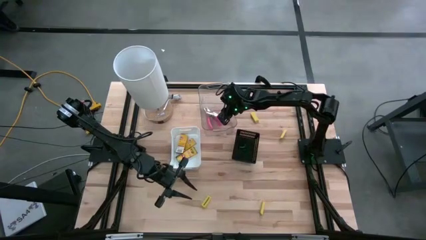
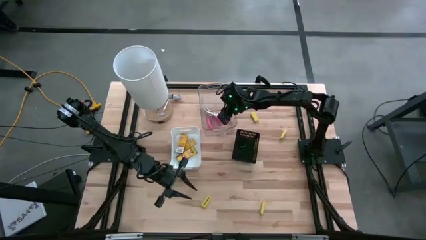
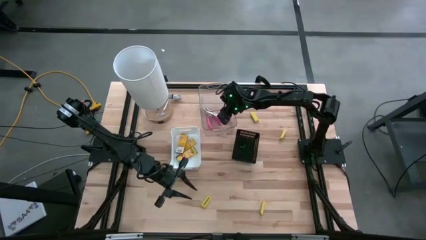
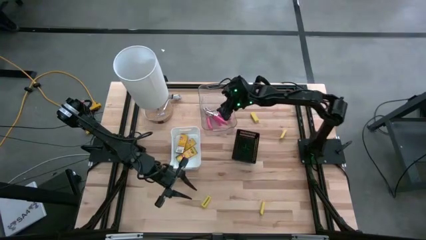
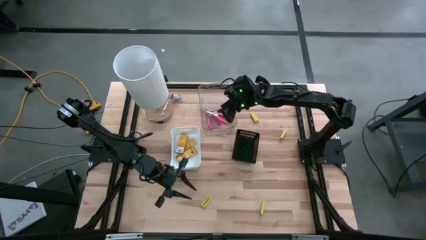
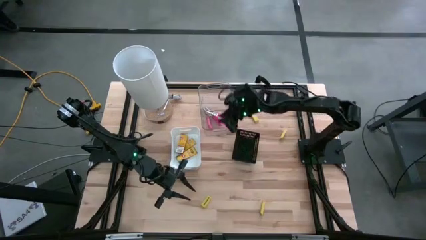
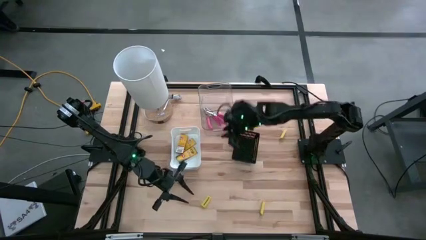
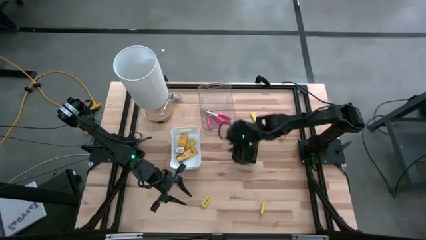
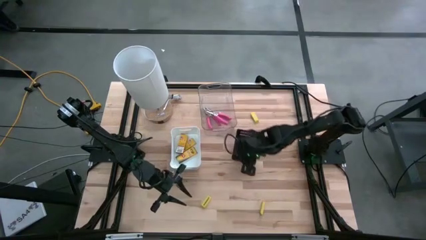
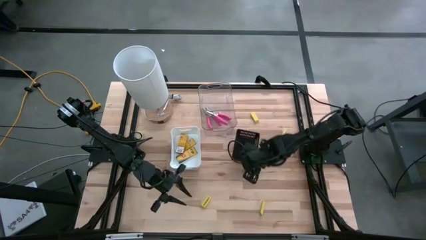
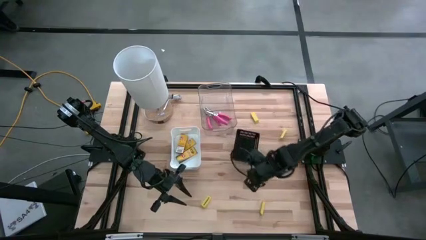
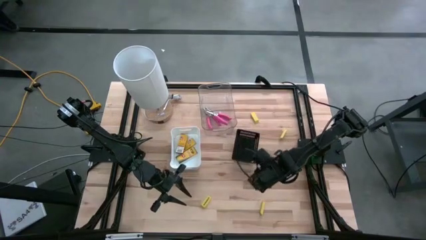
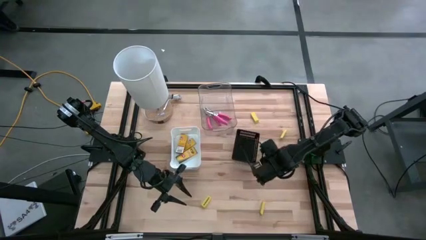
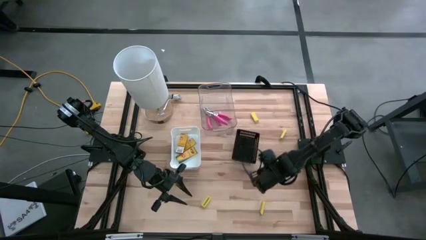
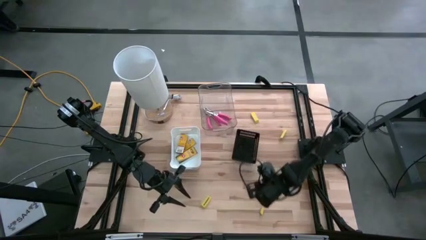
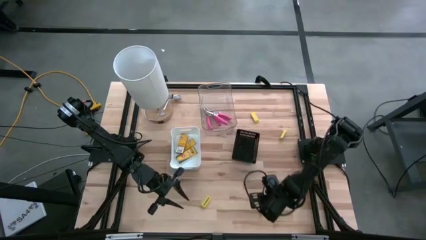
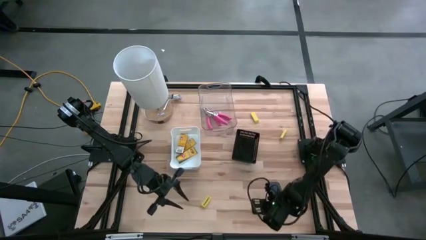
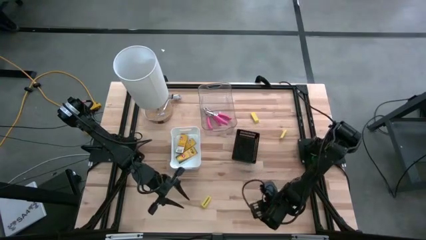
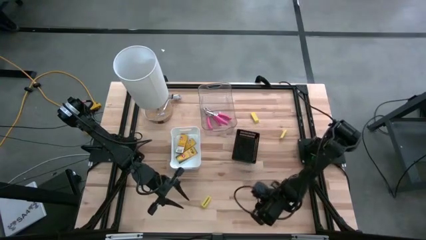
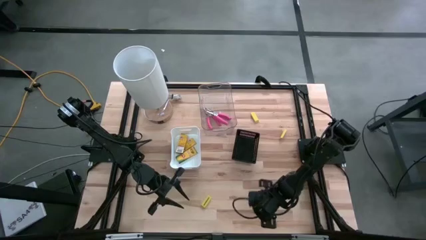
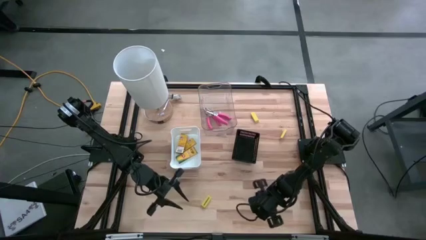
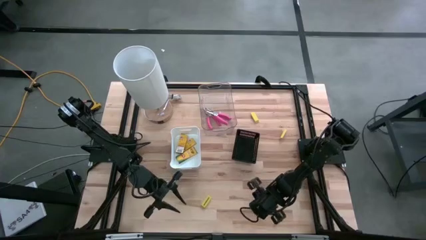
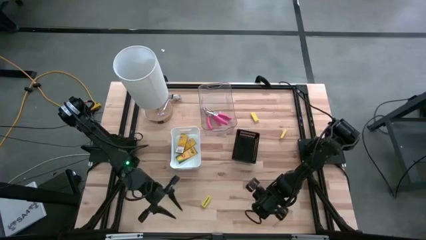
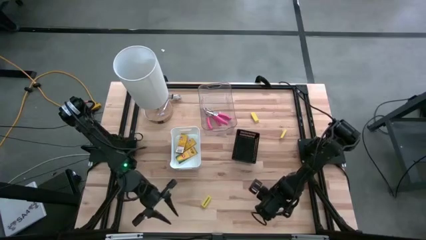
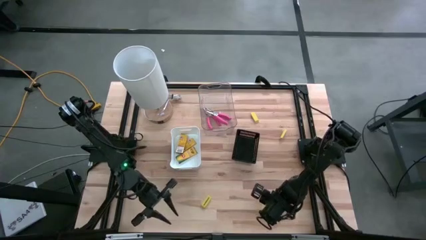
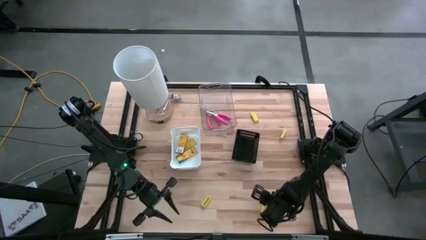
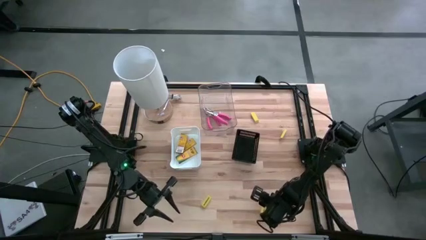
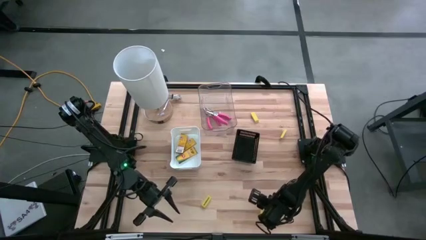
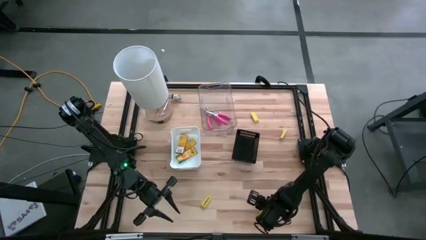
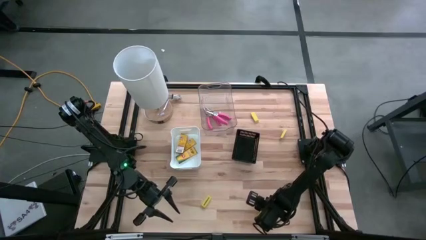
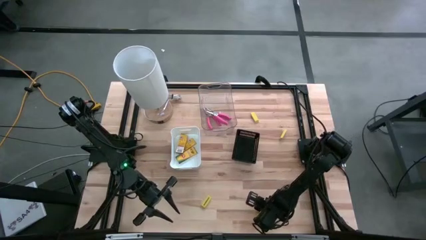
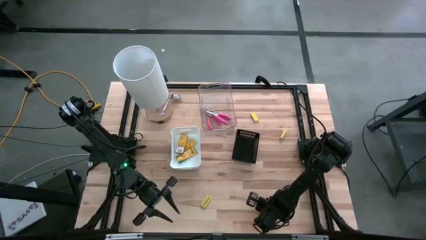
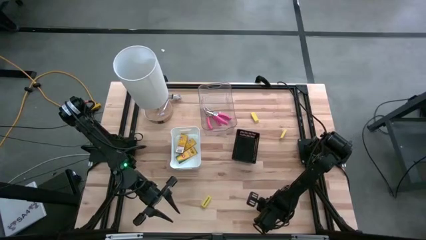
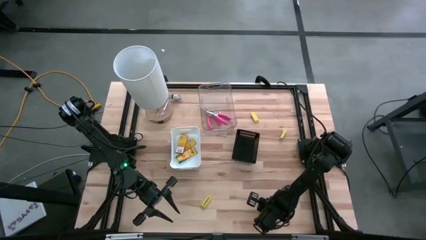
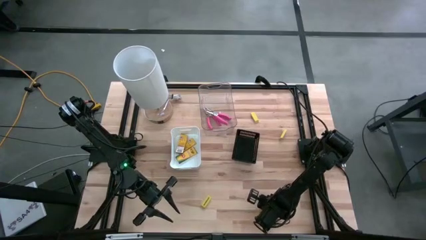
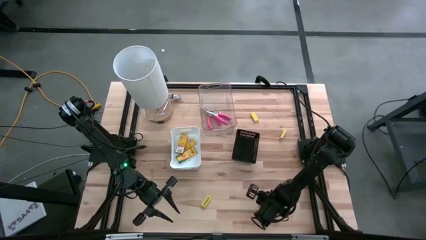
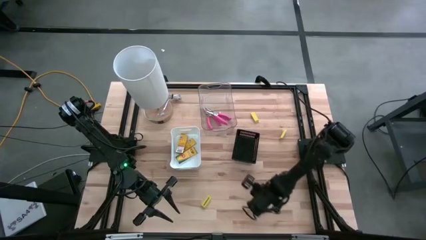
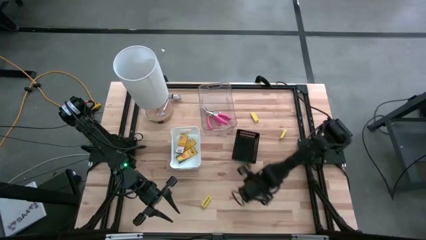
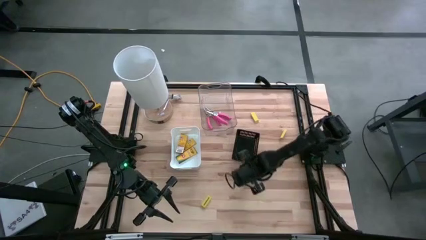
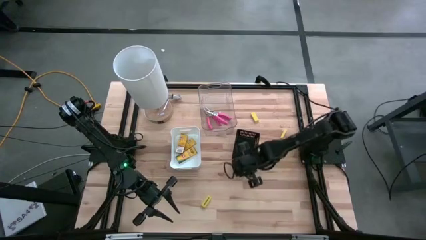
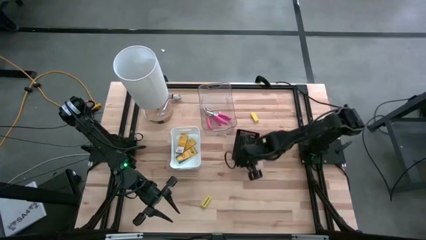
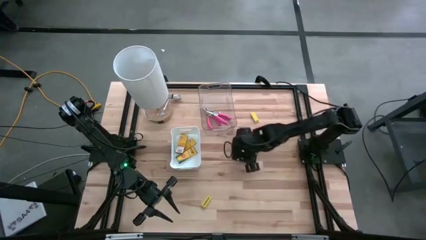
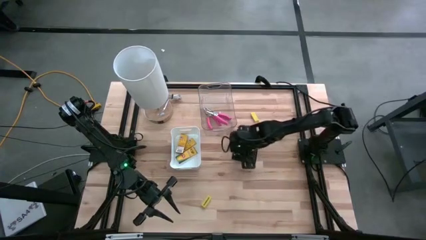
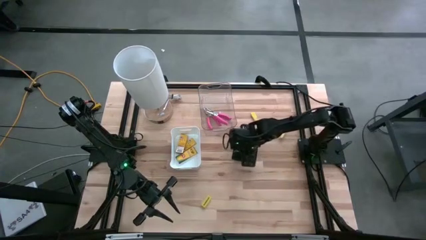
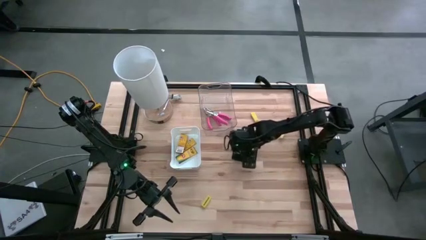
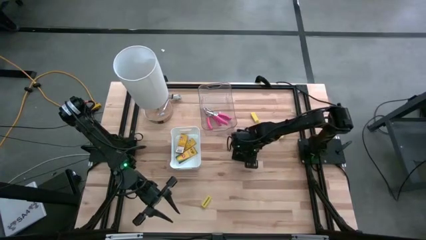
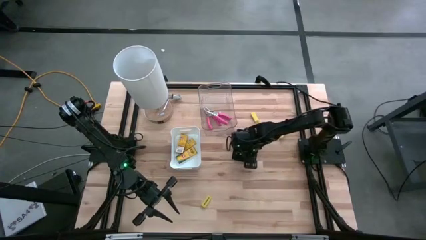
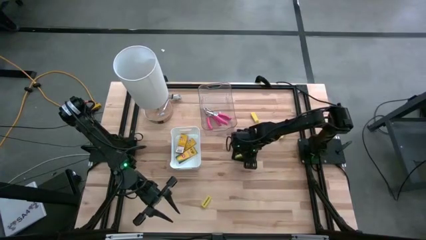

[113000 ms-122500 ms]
Task: Pick & Place School Supplies
Put the bottom right yellow eraser into the black bin

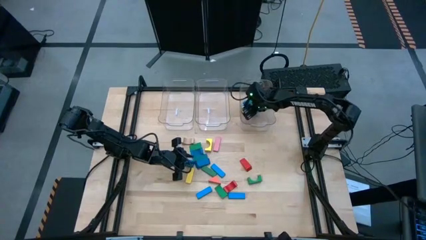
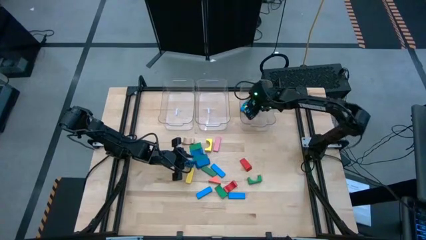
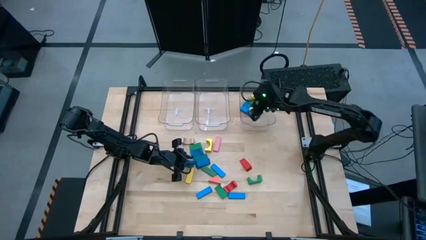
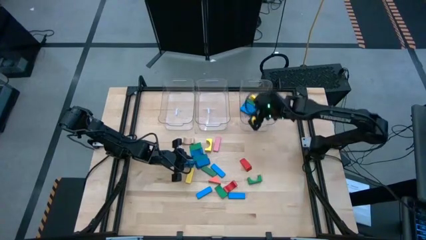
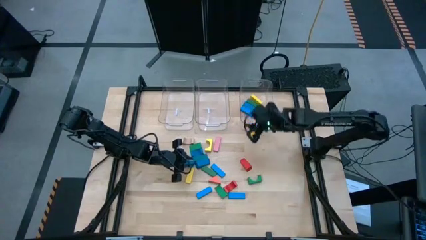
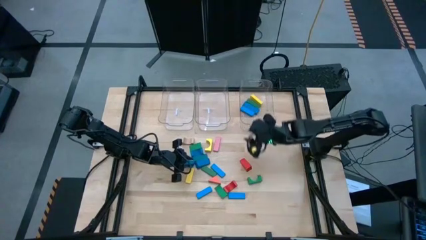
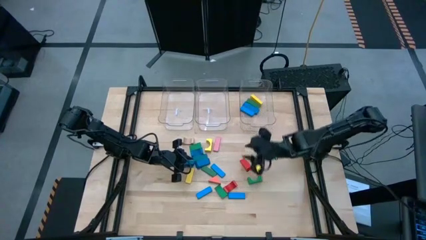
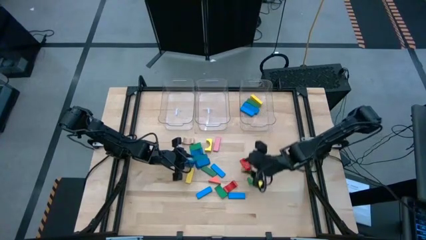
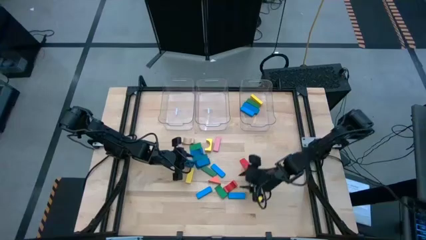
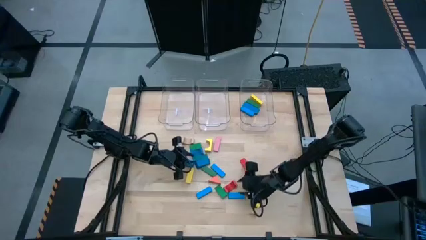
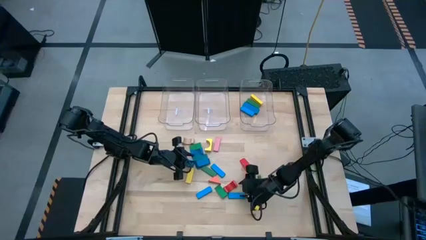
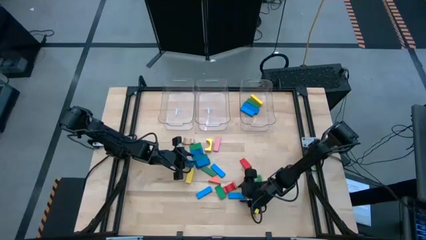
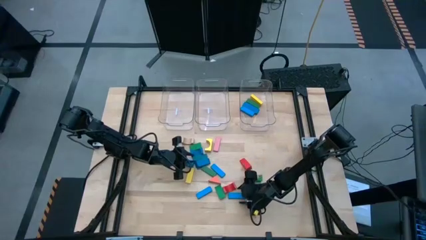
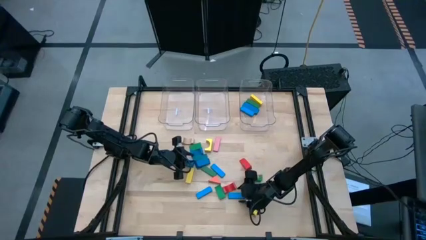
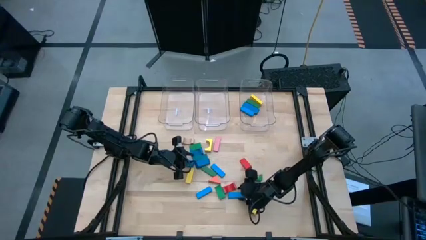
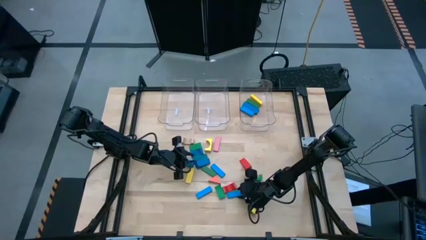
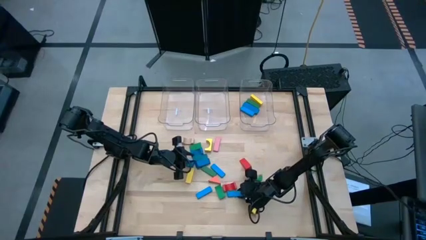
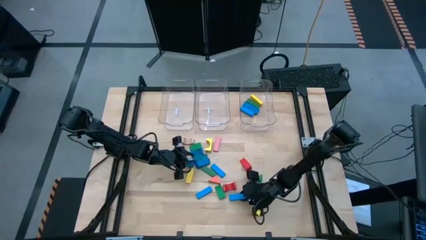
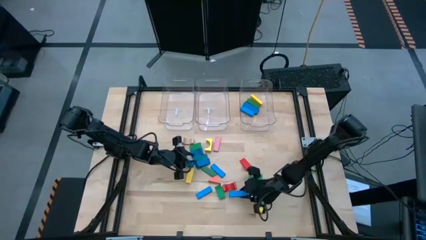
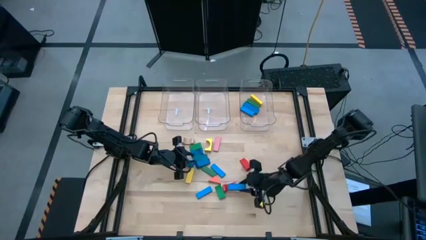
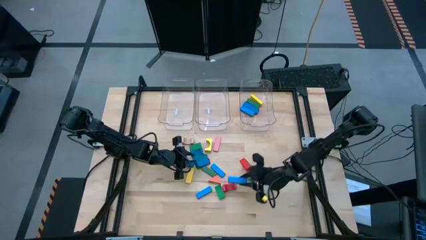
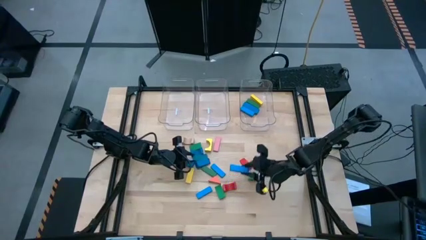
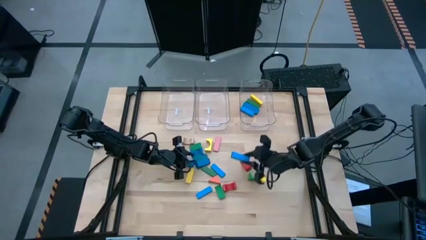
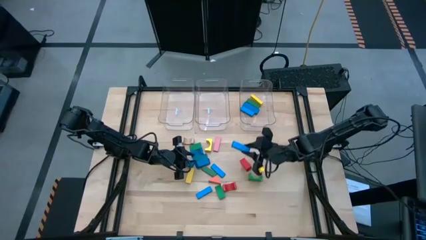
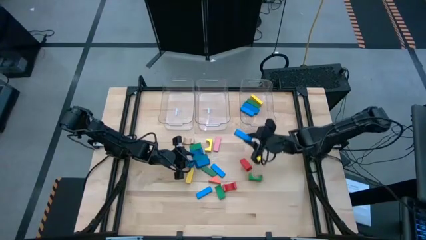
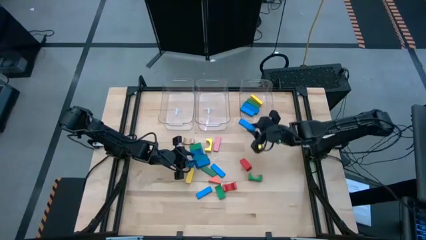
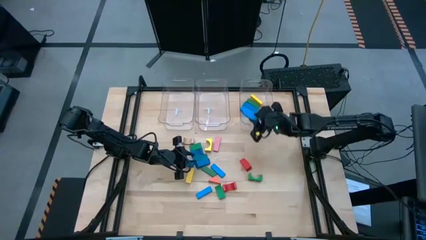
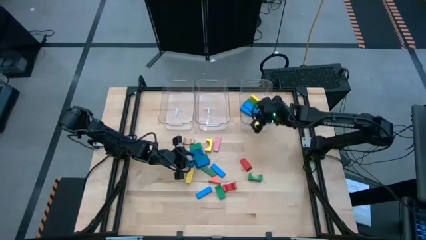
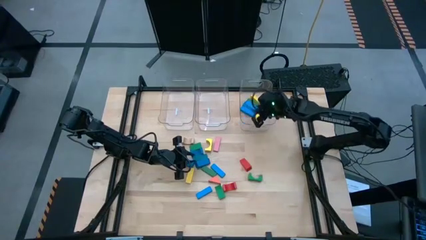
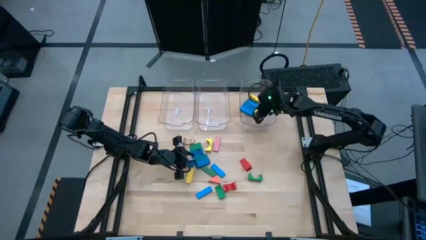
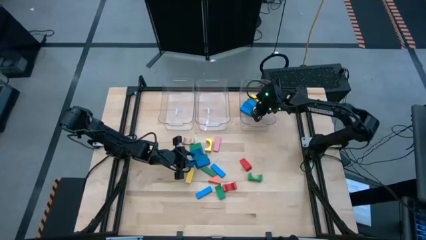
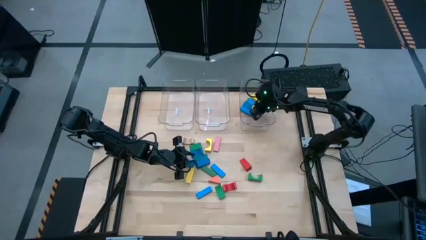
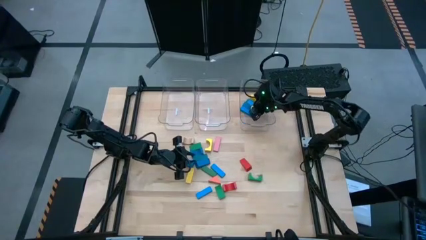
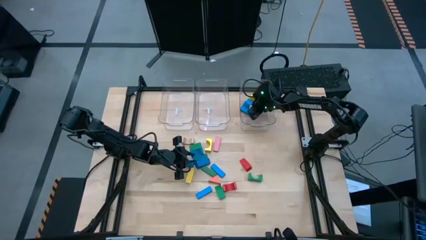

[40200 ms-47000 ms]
Task: Sort blocks by size
Put the blue rectangular block into the right transparent bin
